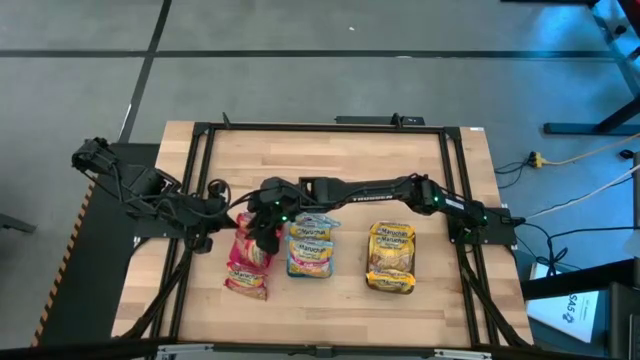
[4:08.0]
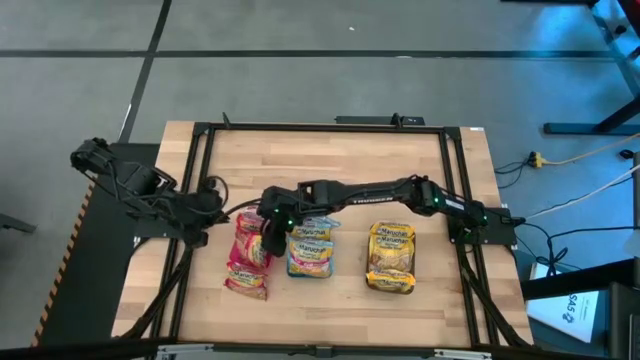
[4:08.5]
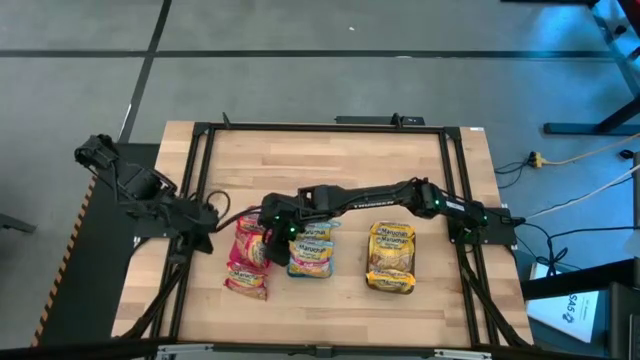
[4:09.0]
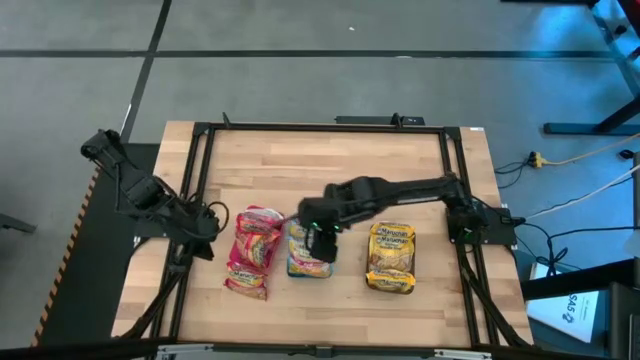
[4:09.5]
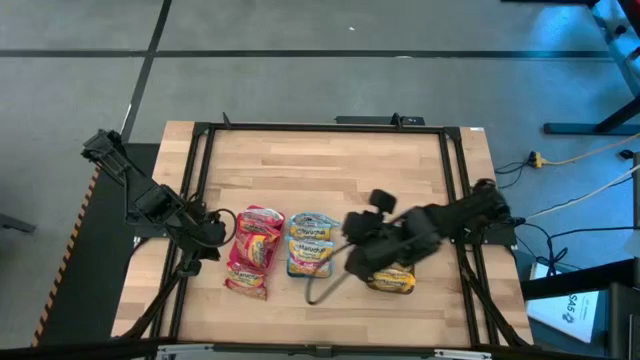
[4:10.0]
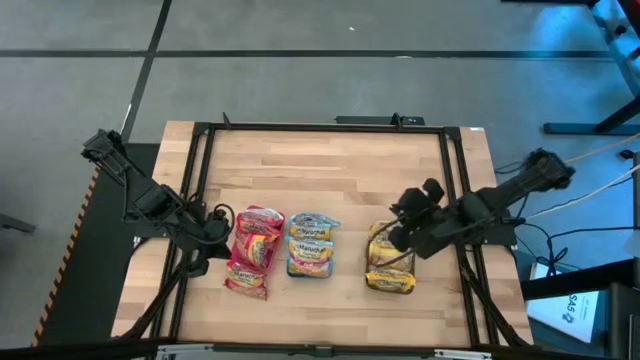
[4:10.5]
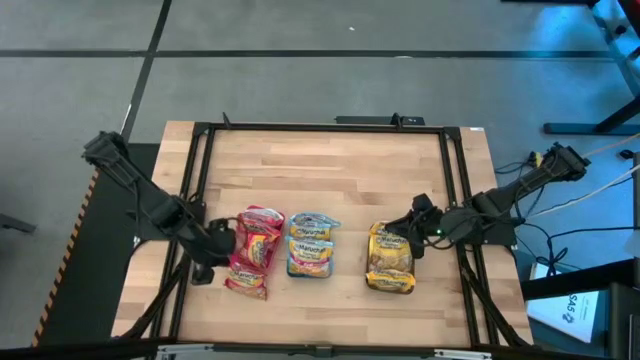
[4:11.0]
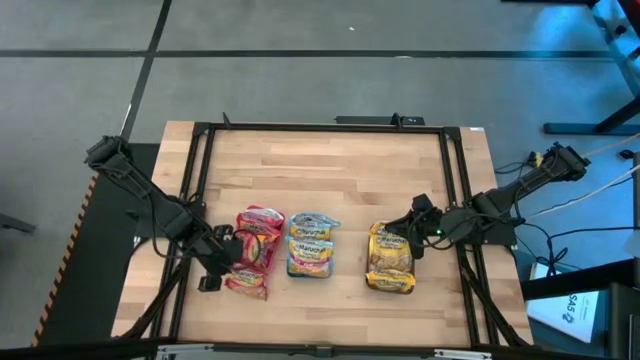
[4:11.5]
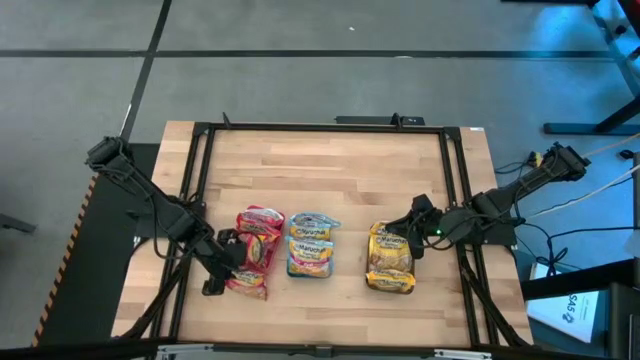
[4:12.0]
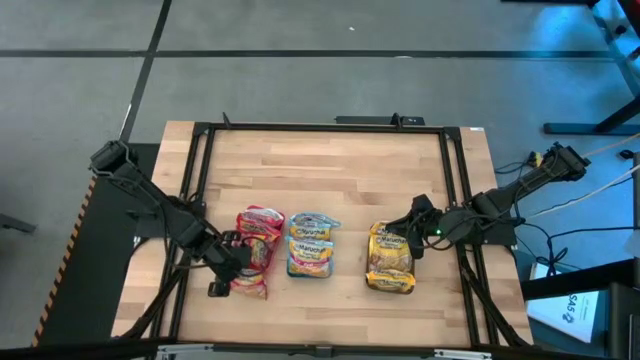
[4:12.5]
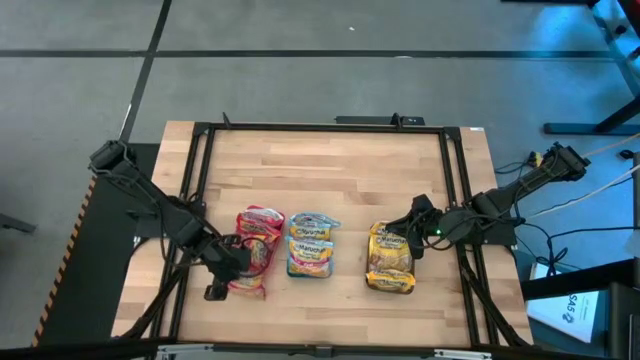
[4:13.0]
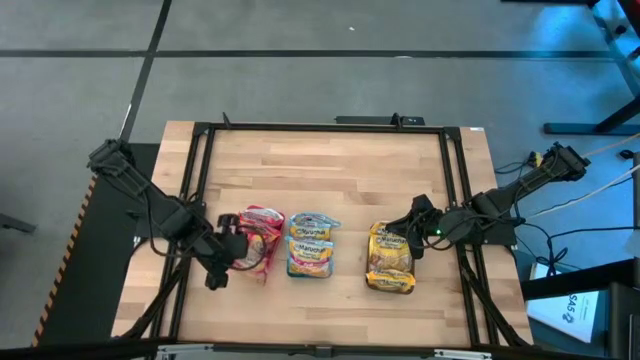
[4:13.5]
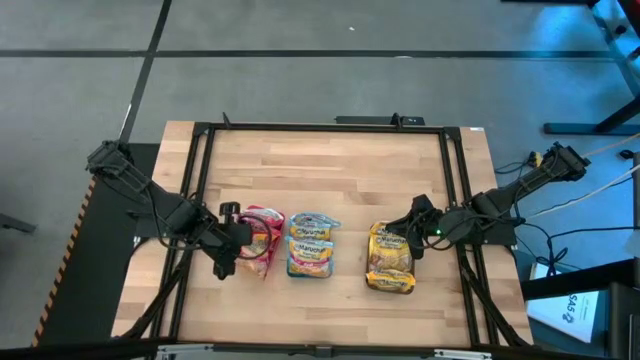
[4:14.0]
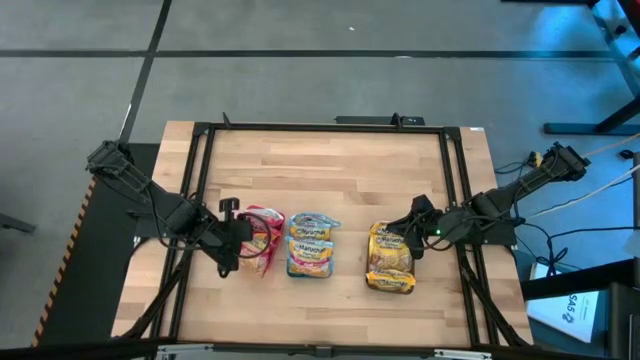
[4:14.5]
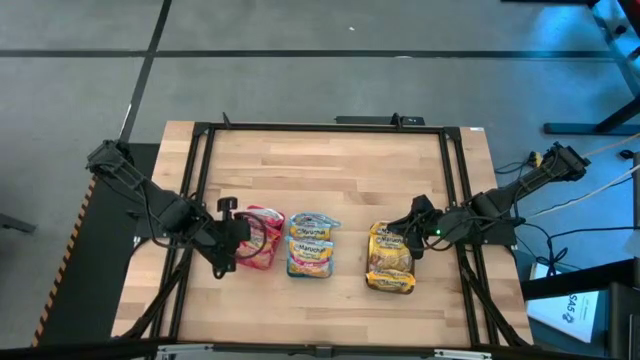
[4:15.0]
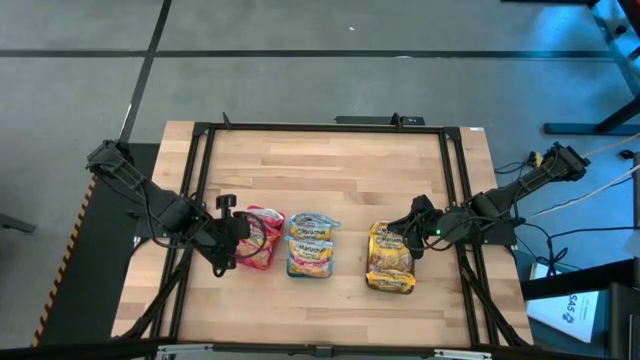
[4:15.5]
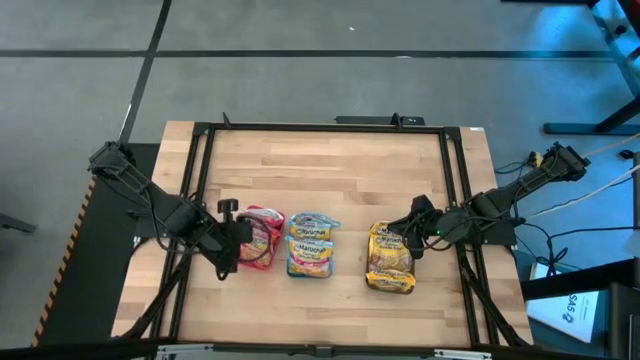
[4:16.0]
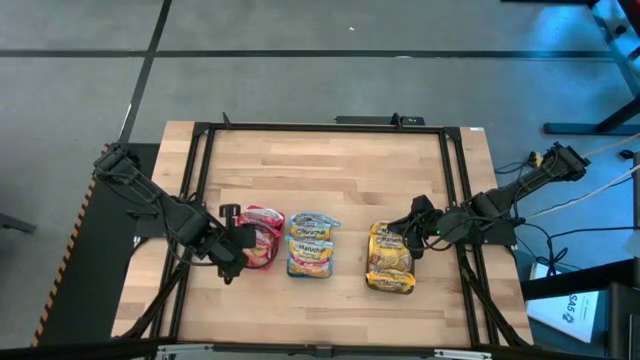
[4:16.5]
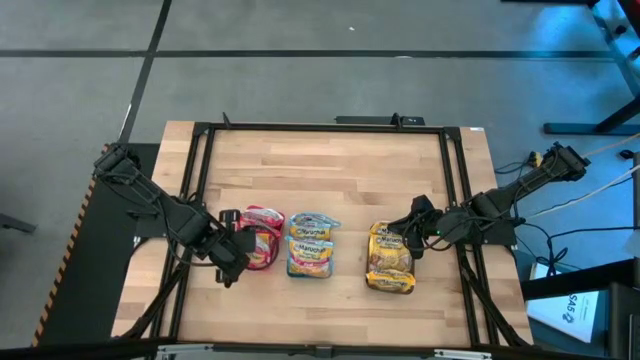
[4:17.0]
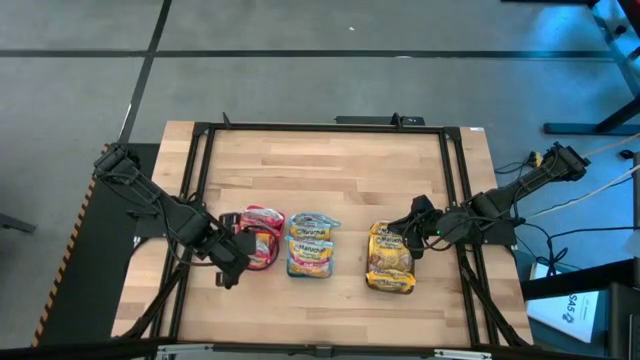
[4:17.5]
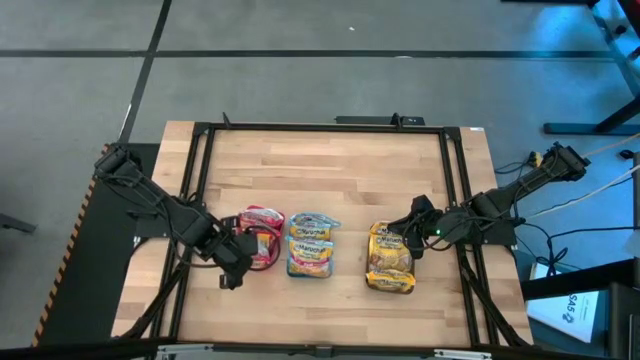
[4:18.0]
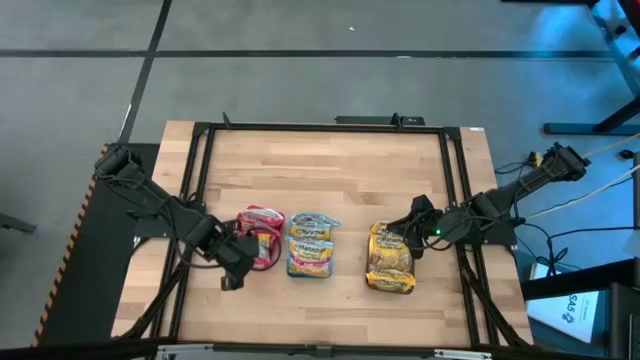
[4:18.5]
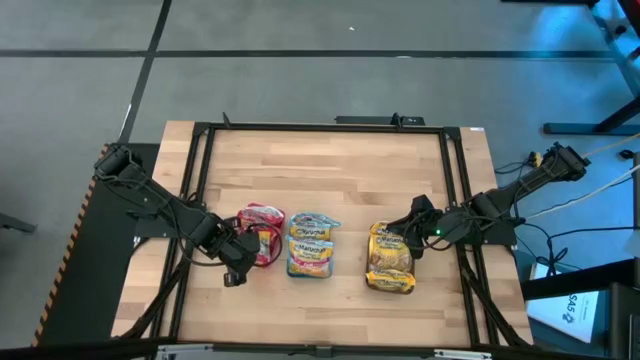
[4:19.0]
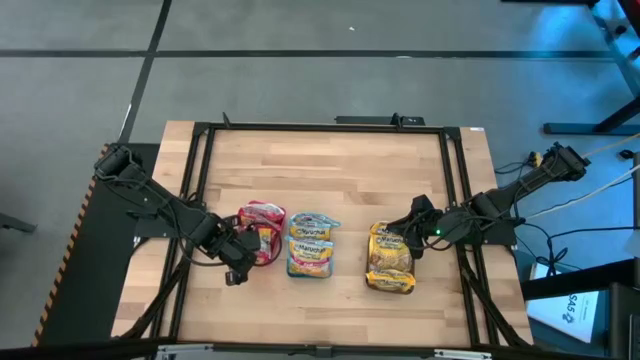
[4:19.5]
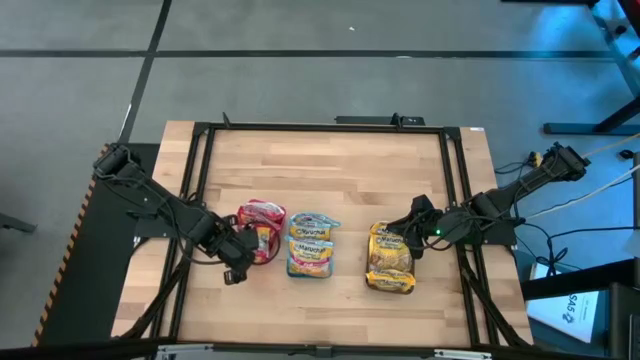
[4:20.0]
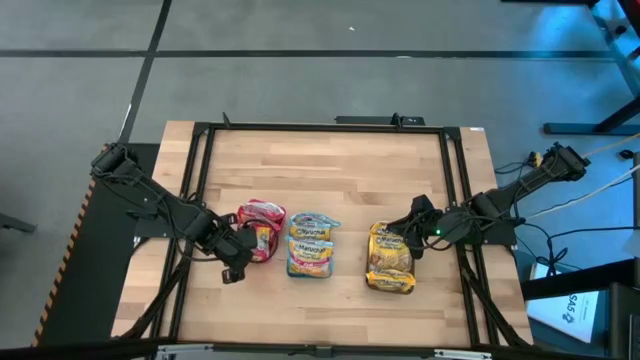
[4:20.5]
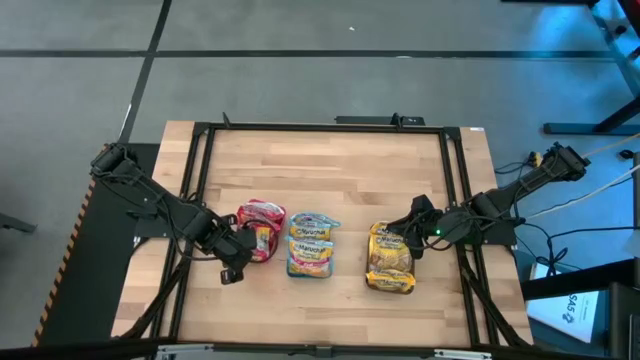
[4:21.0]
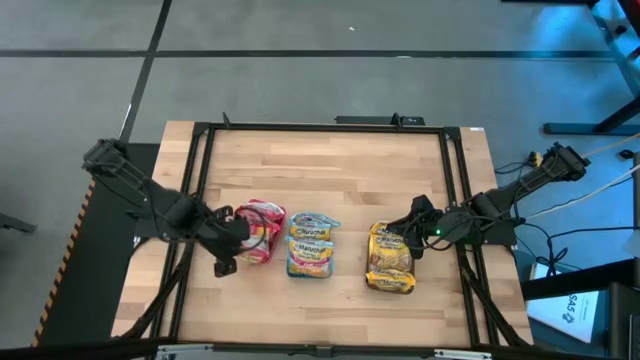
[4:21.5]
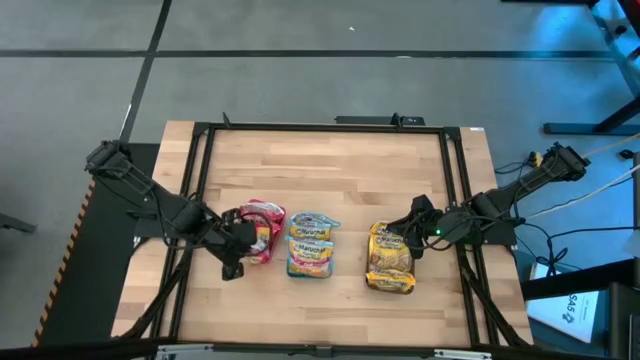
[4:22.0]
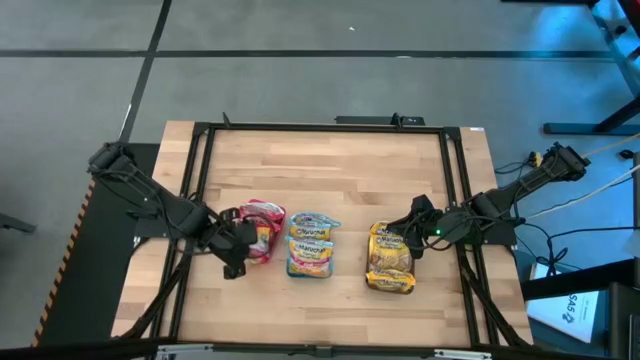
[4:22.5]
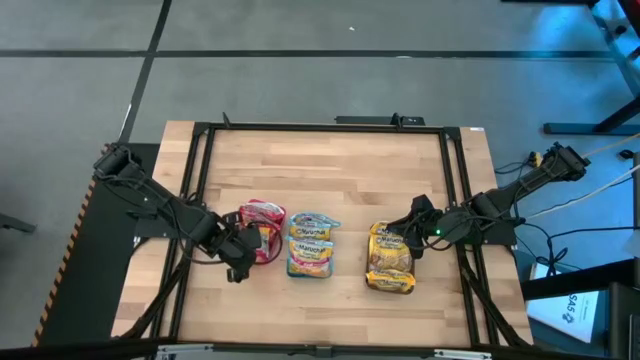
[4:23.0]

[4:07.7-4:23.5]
Task: Sort Maruchan noodles
Put the red noodle pack into the red bin

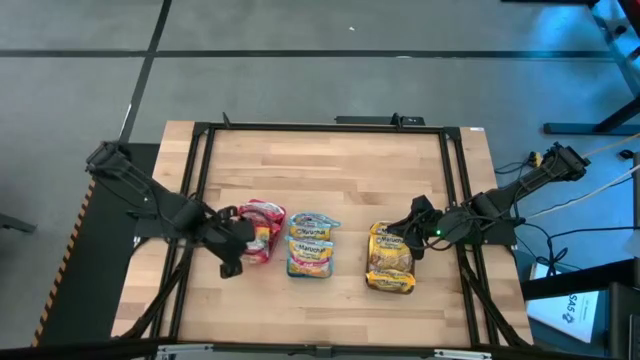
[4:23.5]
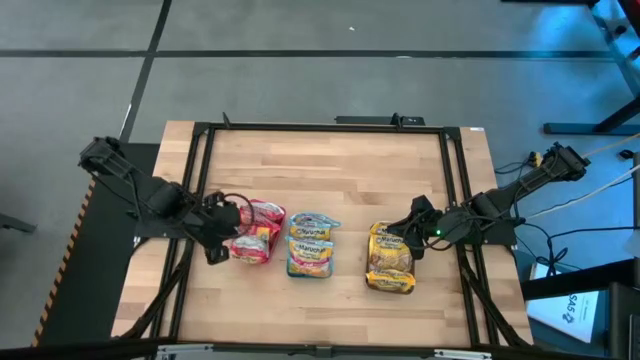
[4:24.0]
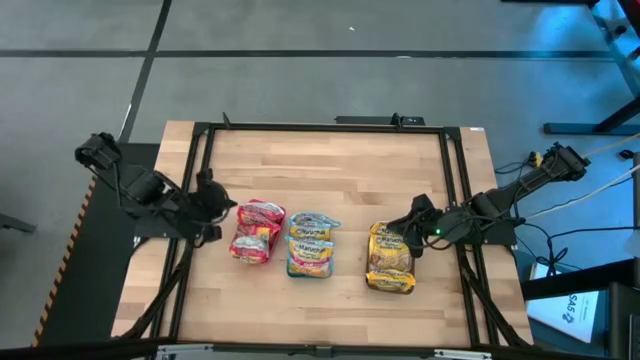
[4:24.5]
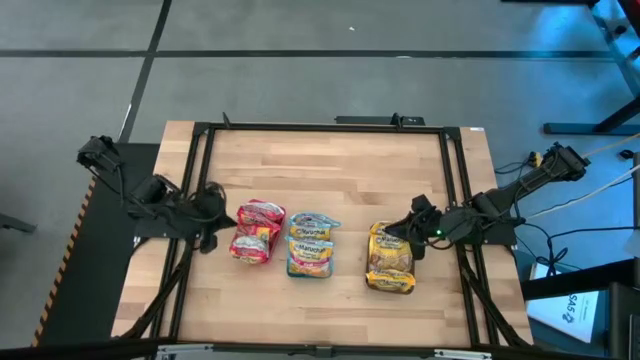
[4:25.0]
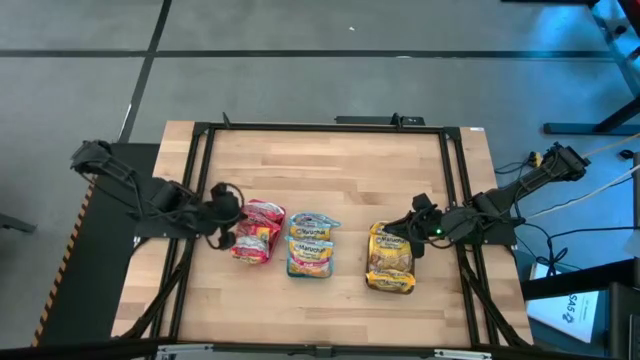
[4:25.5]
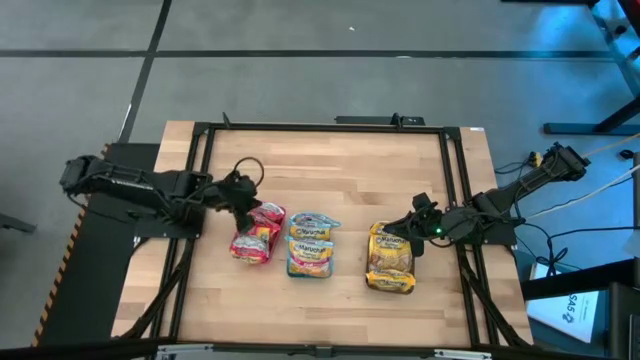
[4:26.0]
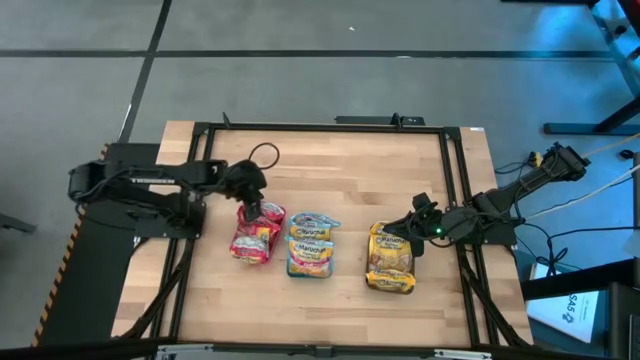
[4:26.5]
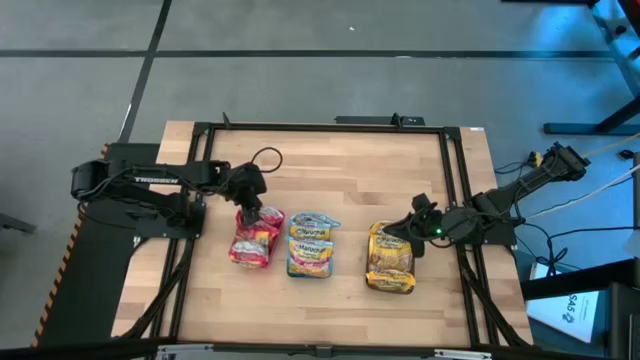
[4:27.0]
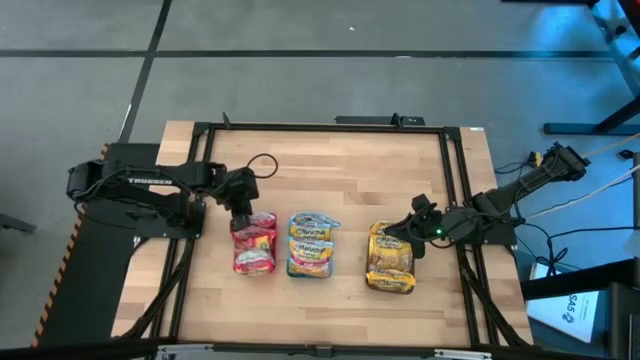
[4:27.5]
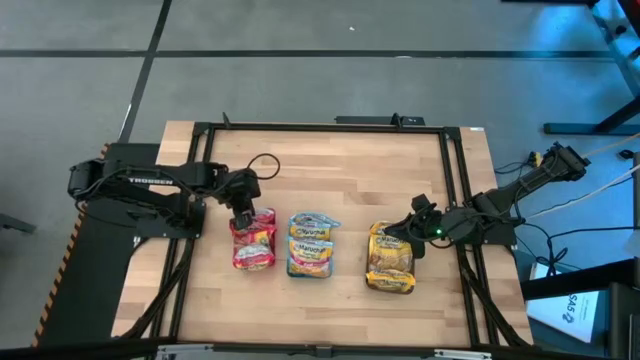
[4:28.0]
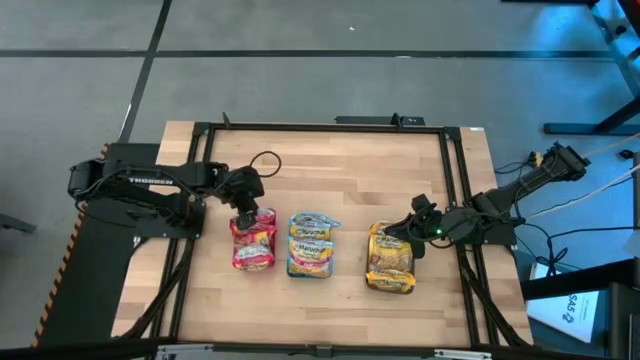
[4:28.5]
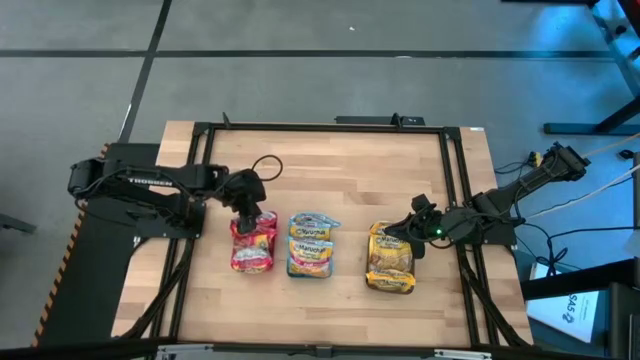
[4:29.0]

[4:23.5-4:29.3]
Adjust the red bin
